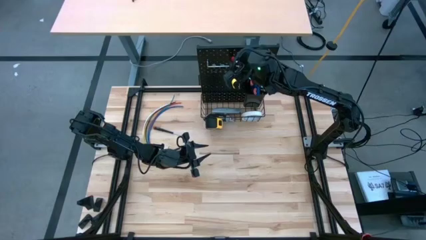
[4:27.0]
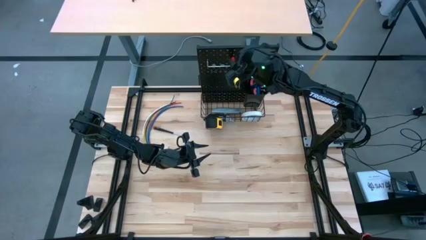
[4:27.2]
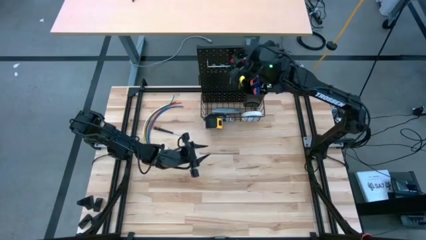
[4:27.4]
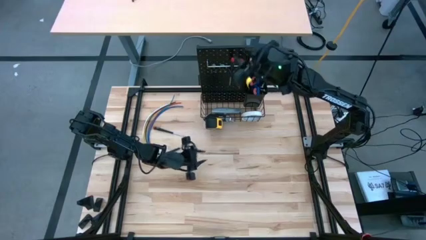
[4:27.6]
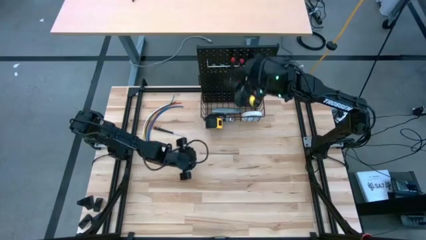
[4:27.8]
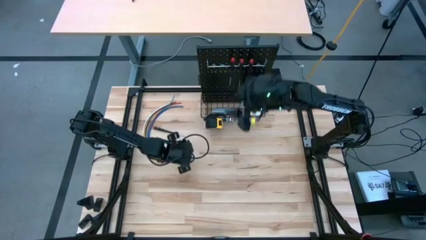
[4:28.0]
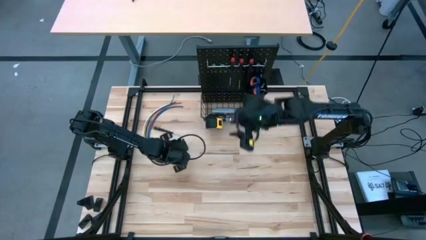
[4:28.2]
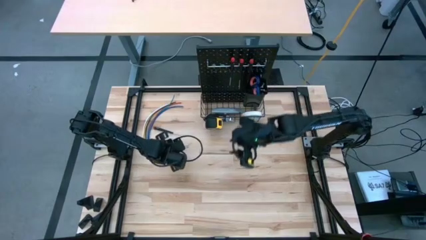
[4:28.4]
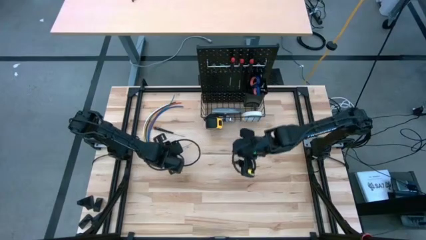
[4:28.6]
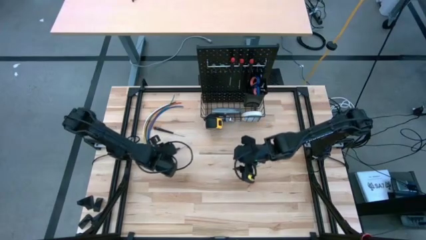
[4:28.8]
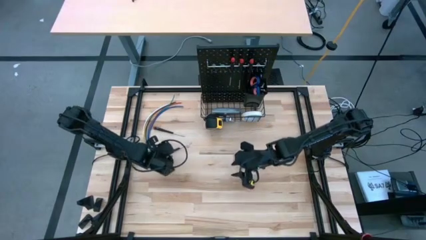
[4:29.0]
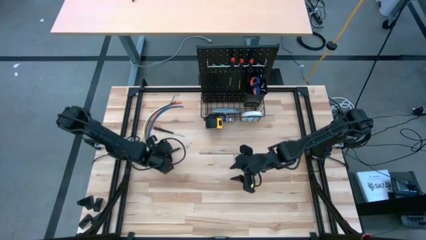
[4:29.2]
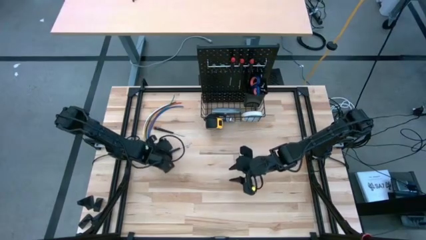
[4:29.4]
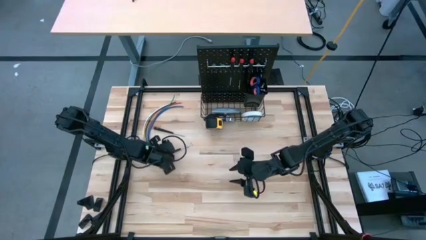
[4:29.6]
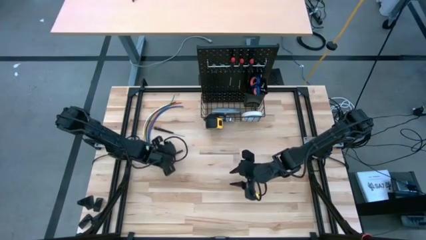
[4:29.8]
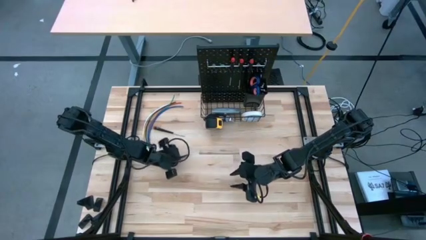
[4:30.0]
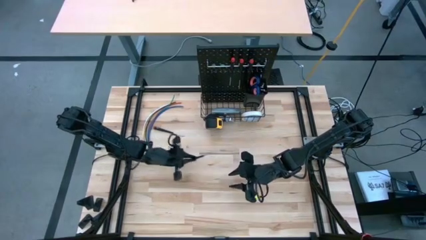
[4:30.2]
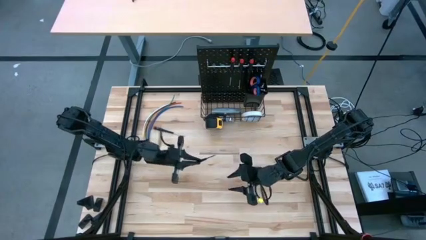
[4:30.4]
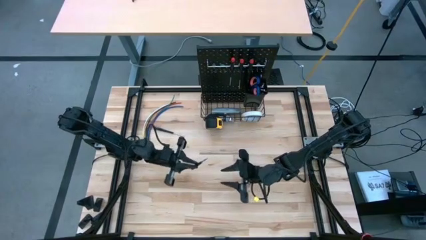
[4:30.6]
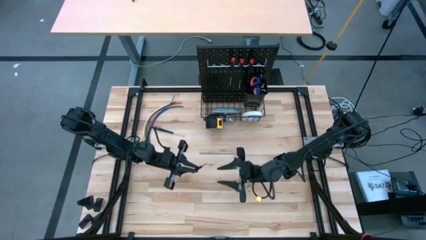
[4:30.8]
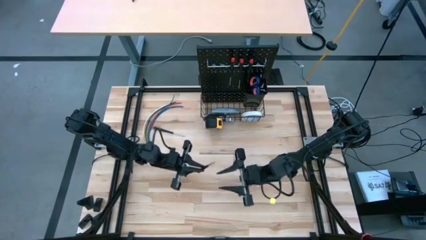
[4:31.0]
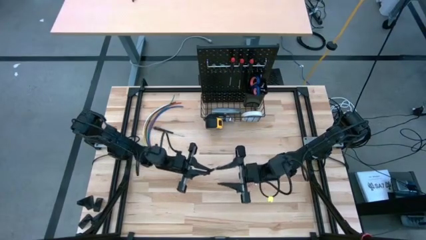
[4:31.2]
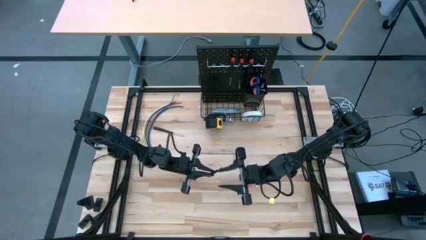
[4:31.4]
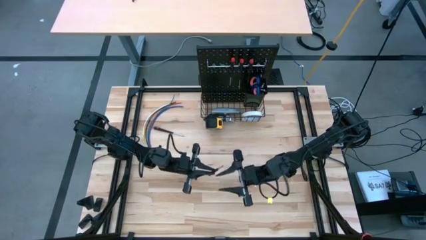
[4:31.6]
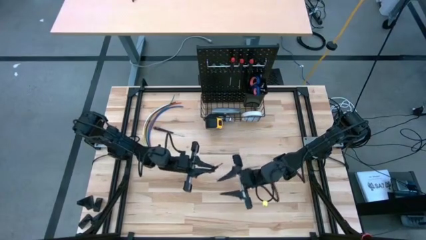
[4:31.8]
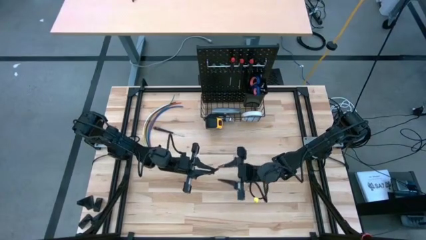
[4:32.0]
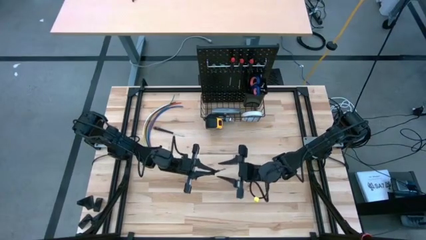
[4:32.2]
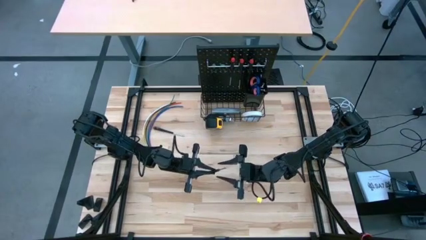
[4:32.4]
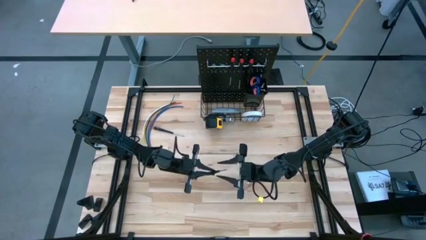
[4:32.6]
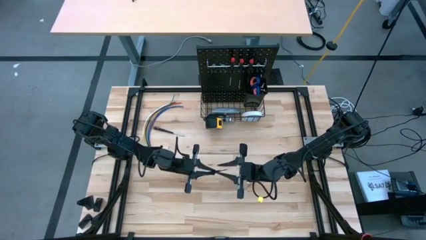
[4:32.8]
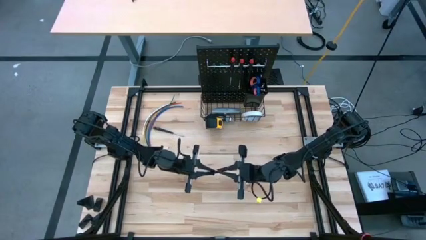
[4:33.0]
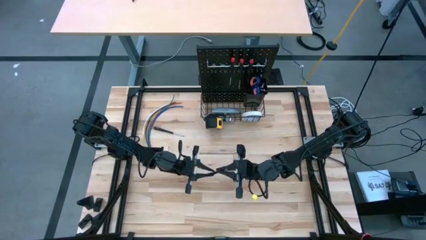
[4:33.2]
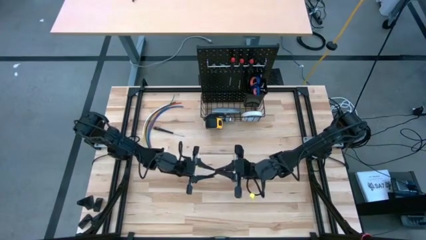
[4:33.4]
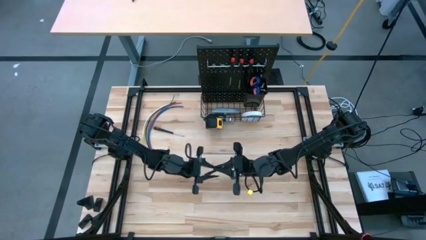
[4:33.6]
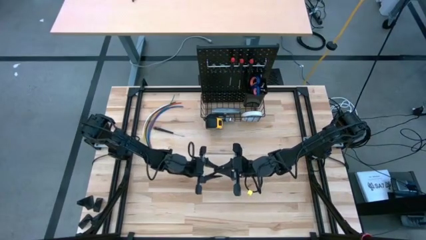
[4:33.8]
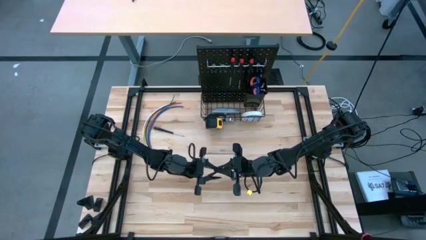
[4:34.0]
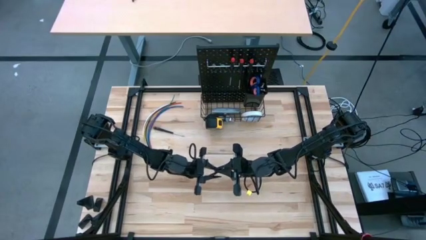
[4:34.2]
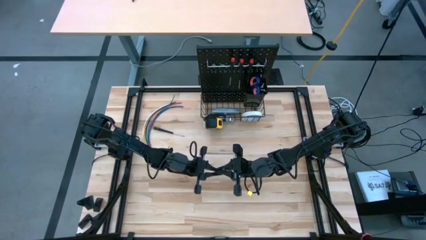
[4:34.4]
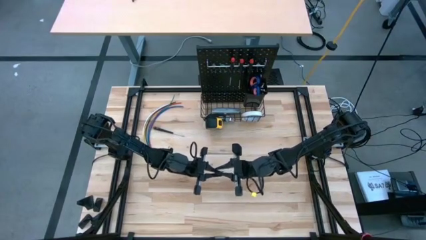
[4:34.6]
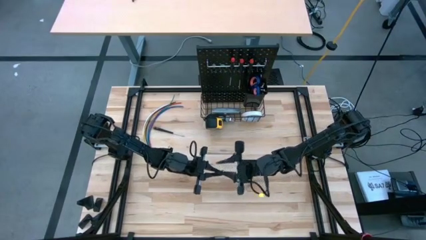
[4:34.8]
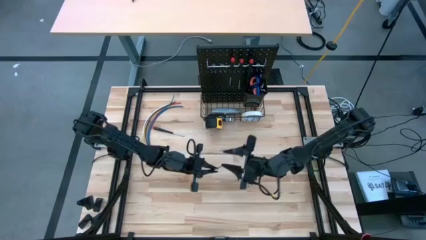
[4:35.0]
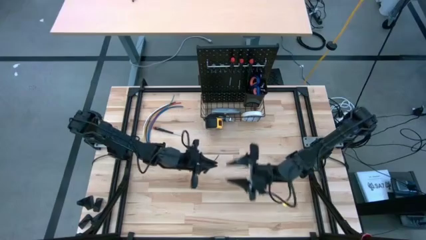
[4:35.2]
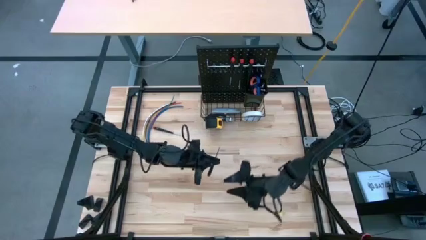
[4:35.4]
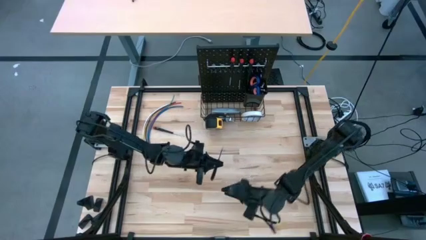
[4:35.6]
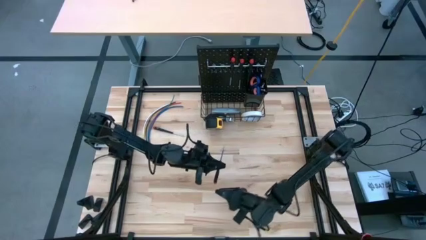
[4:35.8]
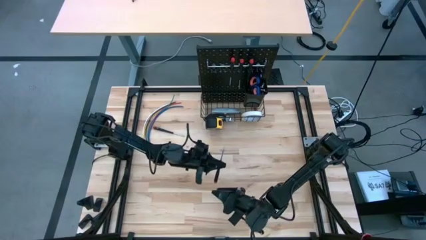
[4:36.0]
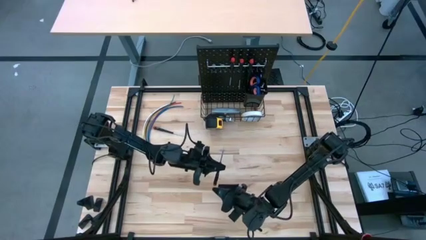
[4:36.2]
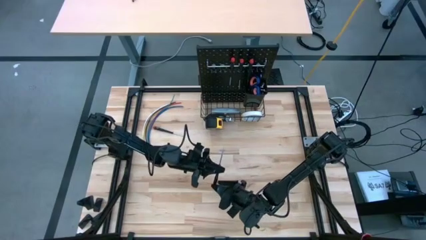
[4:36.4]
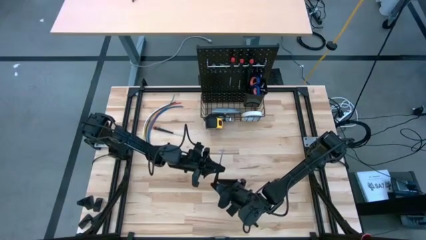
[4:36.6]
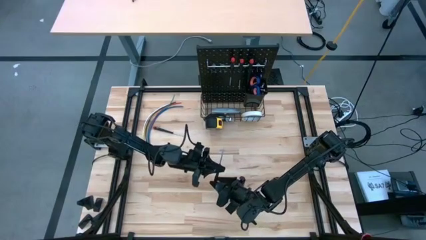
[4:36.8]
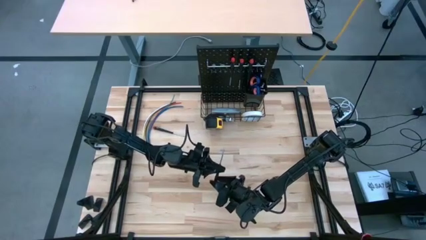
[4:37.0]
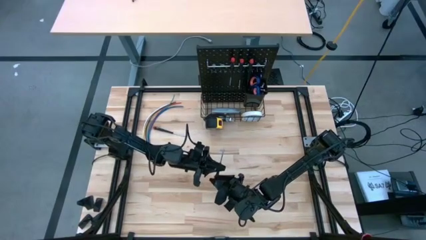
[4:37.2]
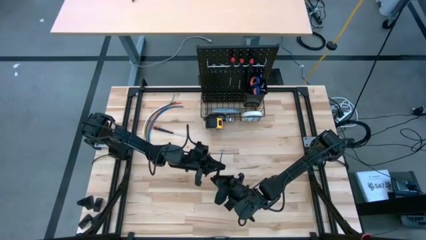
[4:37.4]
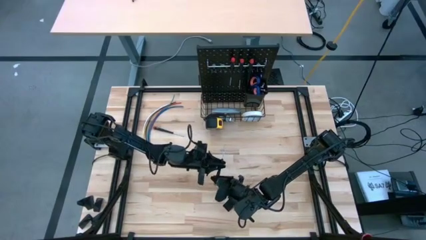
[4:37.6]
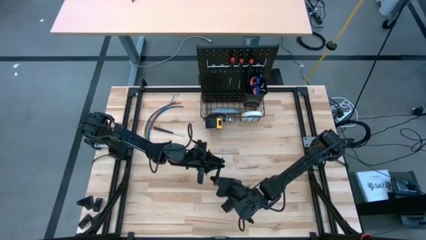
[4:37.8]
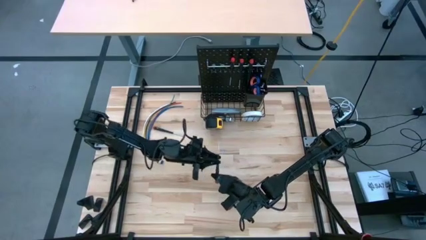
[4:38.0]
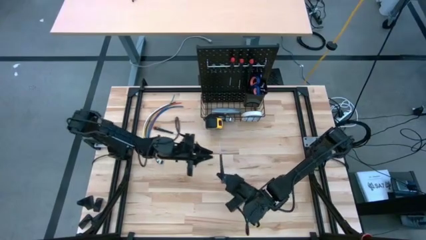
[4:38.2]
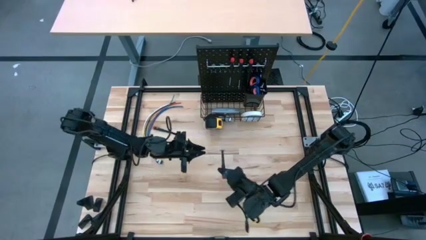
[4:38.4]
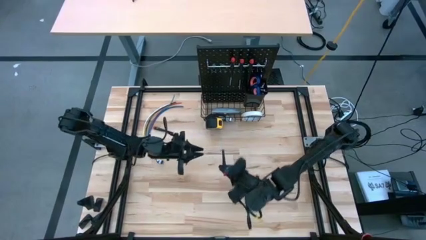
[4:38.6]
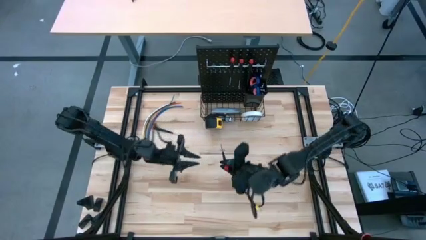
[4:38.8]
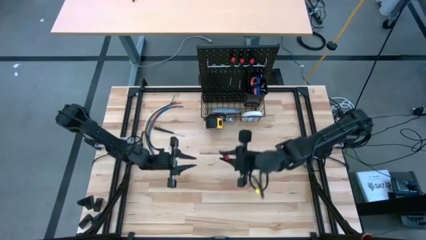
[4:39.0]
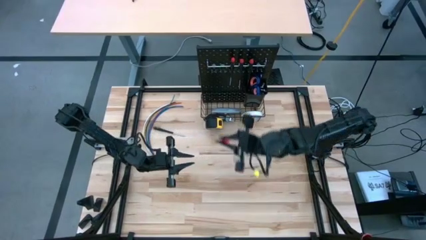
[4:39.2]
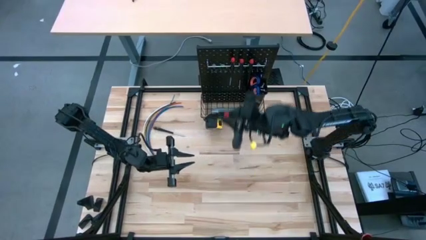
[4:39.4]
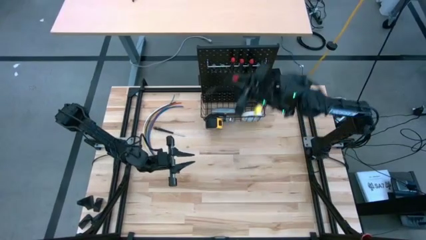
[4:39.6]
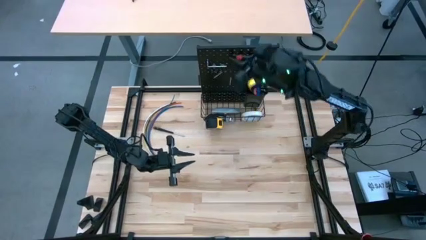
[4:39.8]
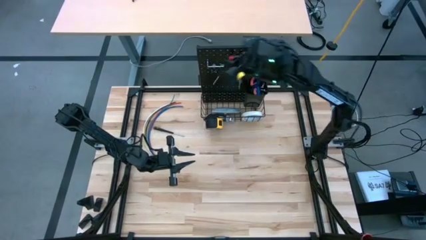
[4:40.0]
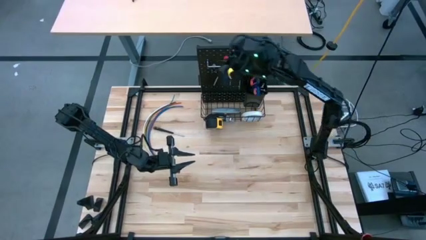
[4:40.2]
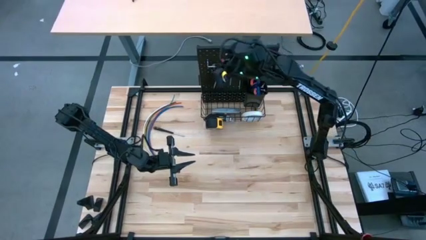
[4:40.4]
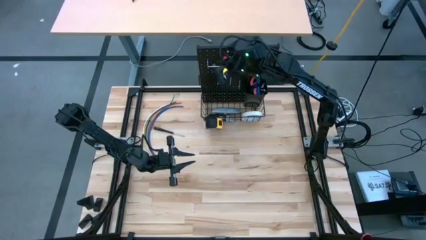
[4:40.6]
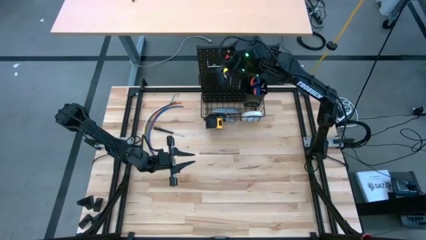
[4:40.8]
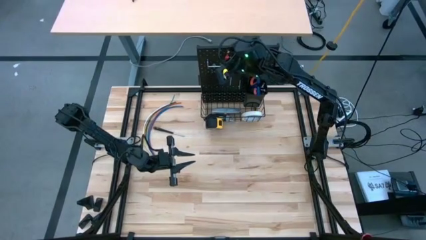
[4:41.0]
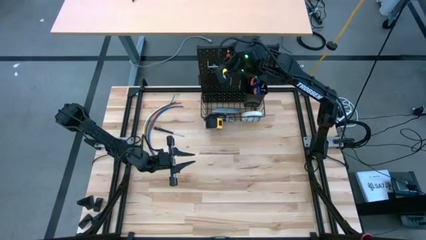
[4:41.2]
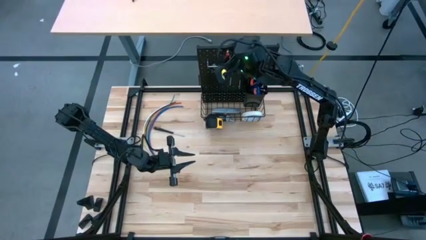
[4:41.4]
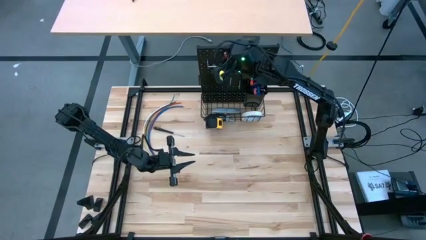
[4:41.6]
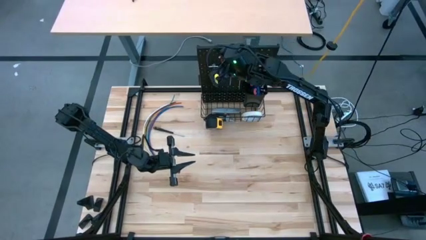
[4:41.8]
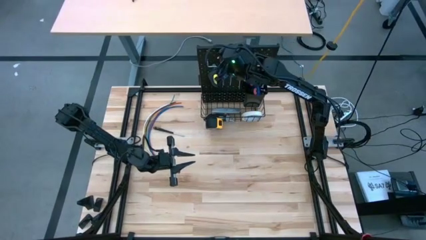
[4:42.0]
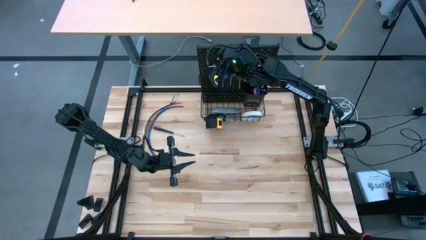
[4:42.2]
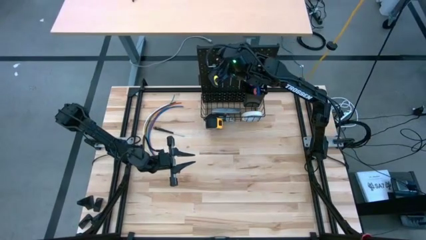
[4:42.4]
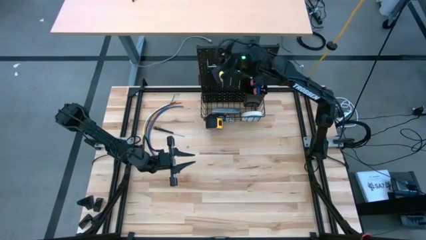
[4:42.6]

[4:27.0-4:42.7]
Task: Hang tools onto peg board
Hang the black screwdriver on the pegboard
